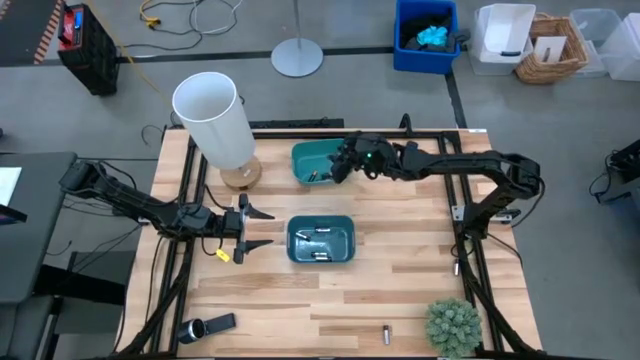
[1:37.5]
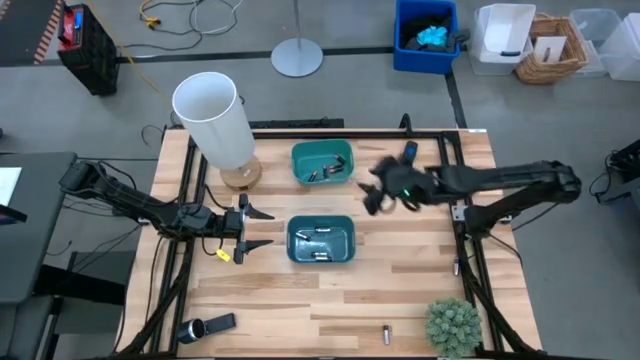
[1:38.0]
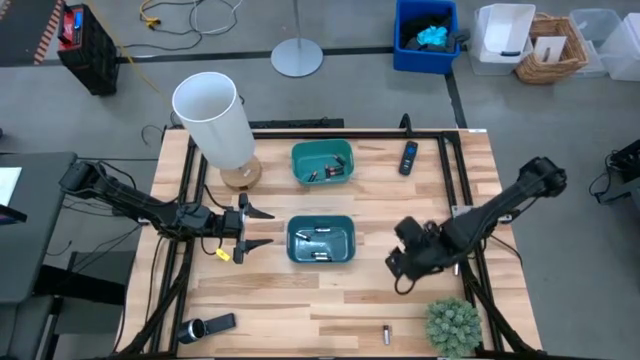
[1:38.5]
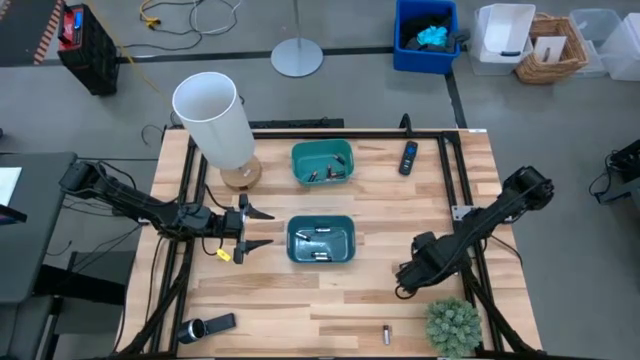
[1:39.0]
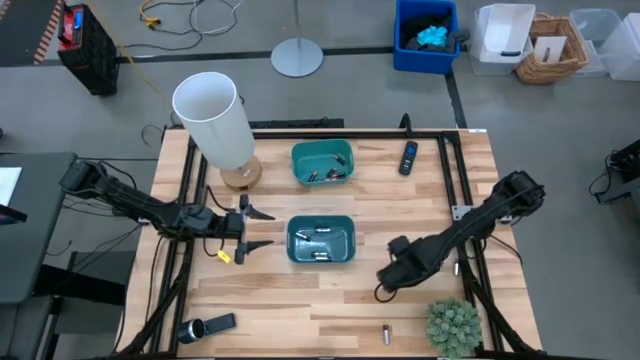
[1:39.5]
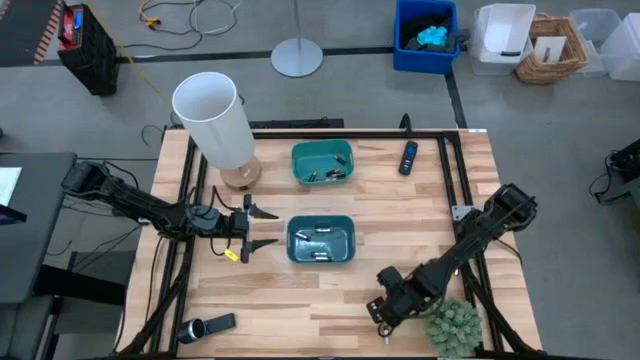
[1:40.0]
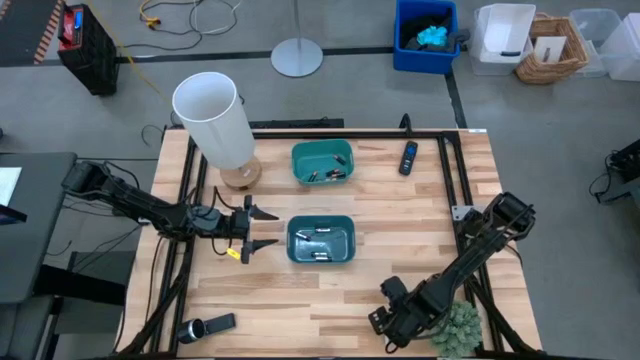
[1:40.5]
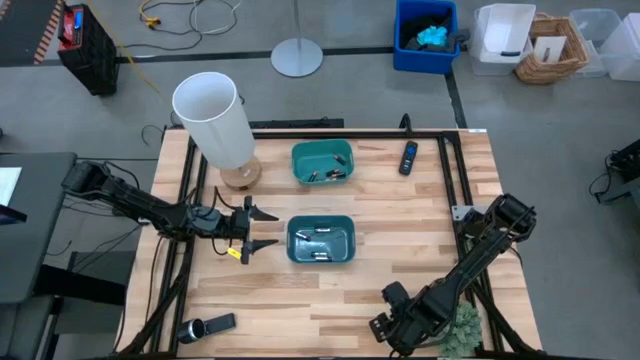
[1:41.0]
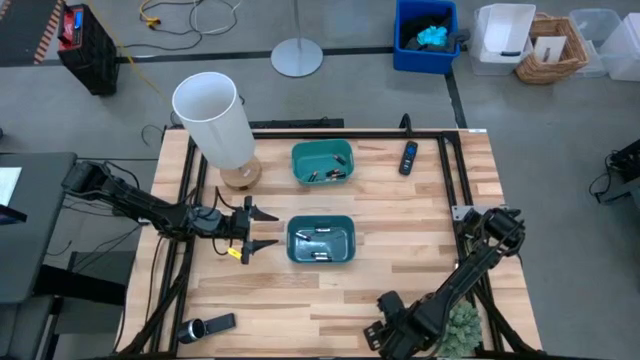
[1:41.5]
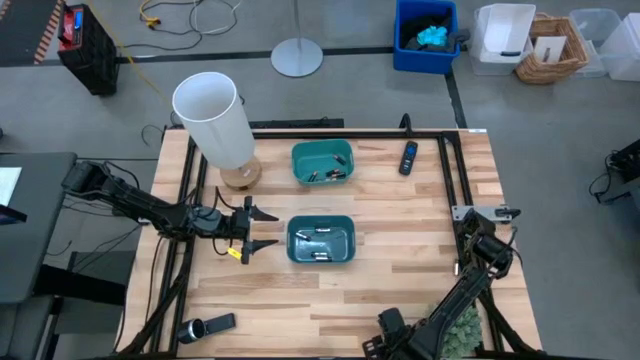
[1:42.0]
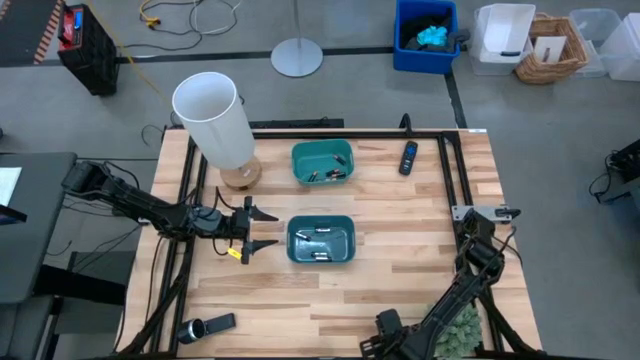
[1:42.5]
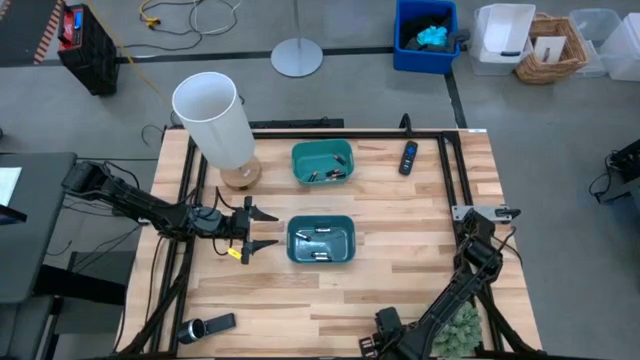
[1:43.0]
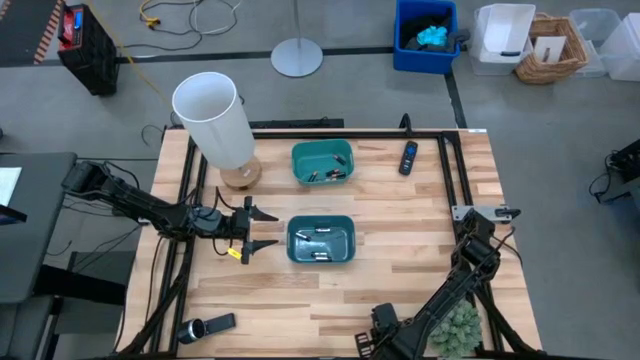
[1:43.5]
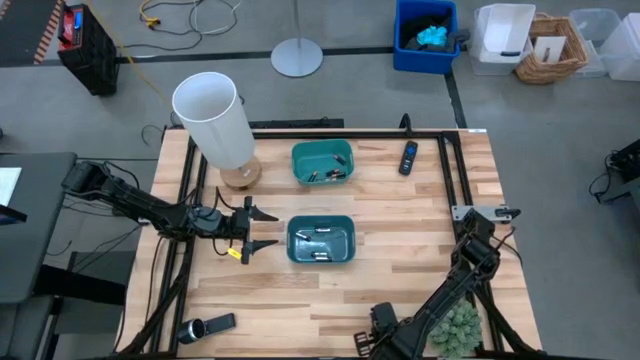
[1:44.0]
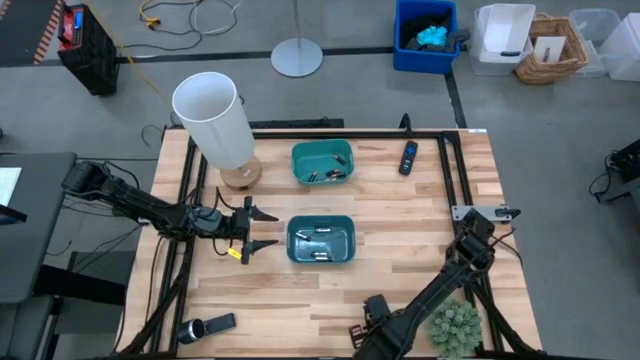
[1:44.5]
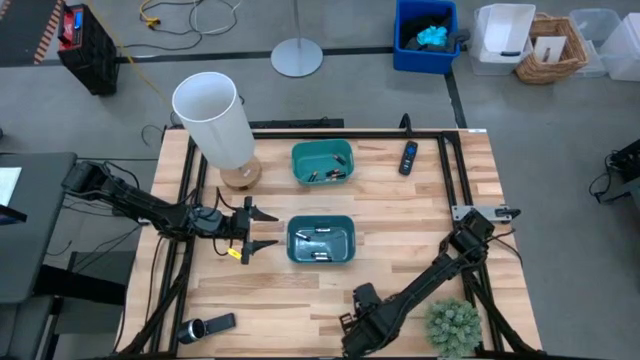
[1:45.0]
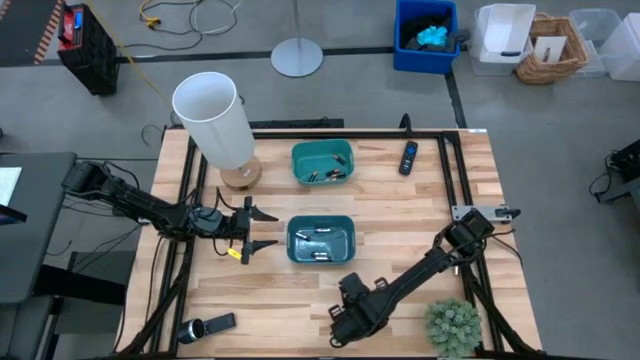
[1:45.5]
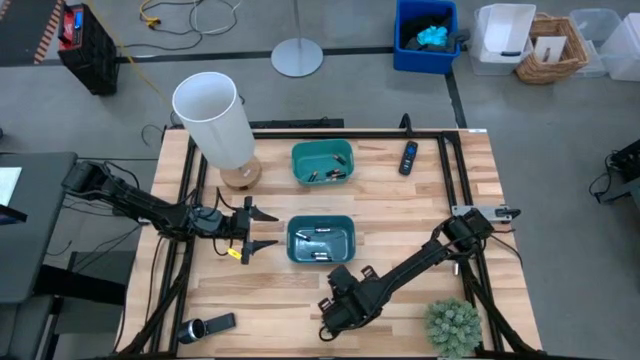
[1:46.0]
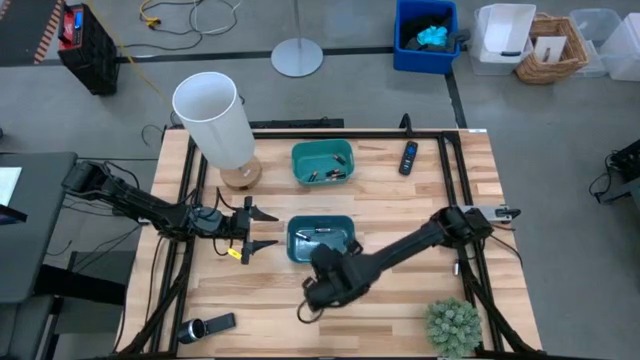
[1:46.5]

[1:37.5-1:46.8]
Task: Sort batteries
Put the silver battery into the blue bin

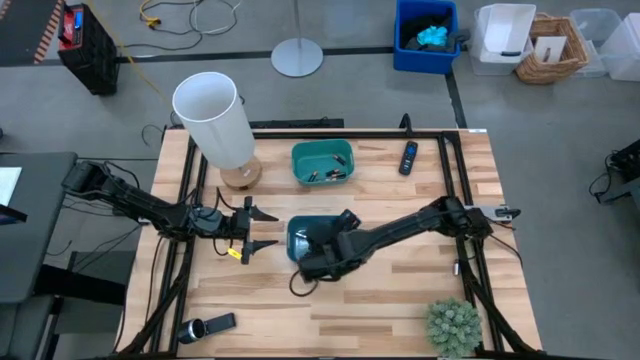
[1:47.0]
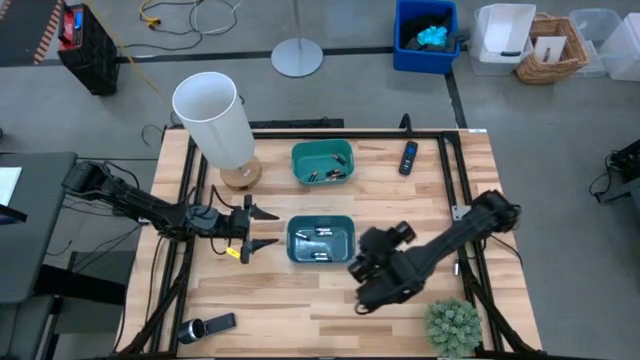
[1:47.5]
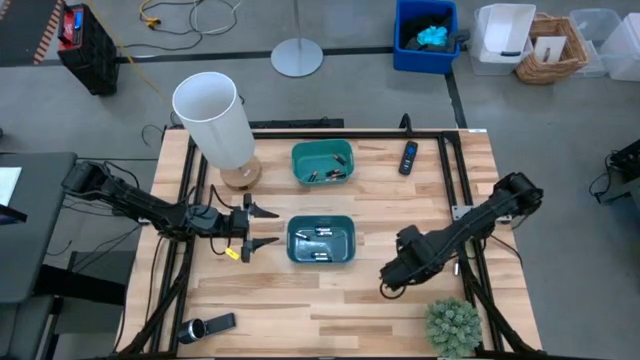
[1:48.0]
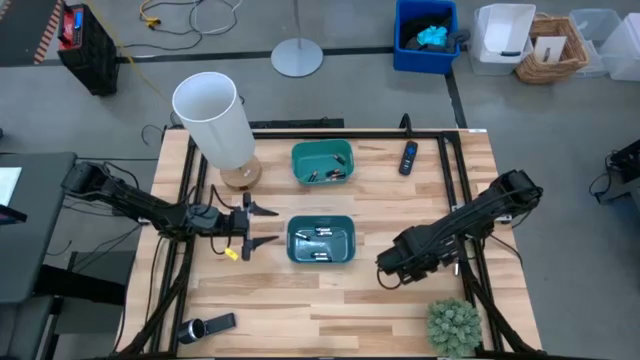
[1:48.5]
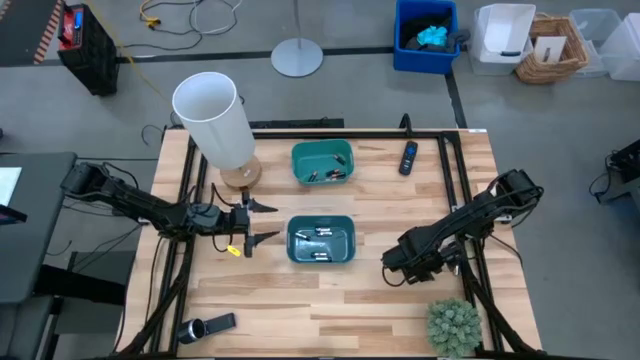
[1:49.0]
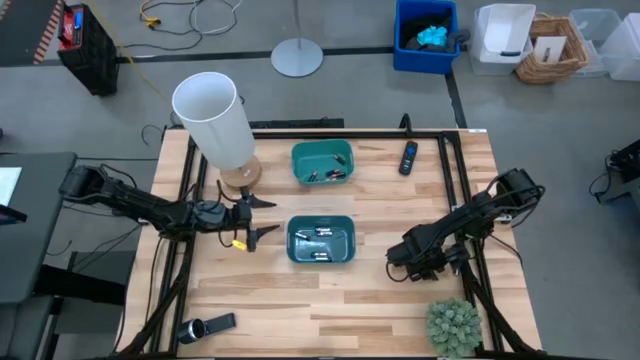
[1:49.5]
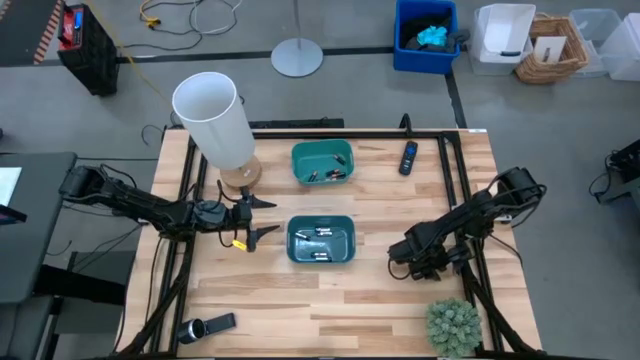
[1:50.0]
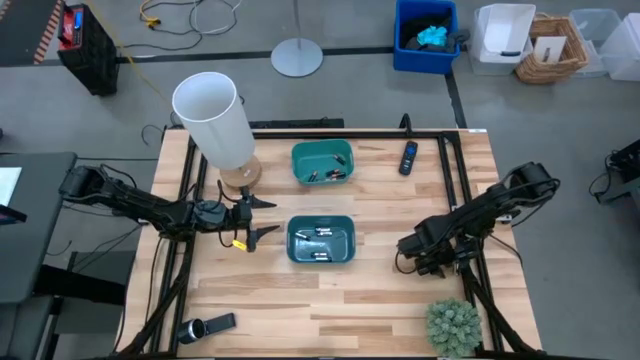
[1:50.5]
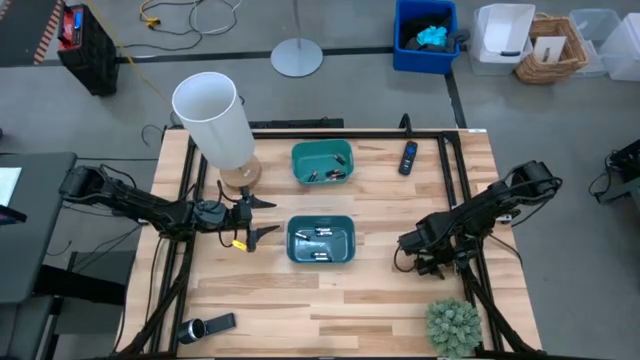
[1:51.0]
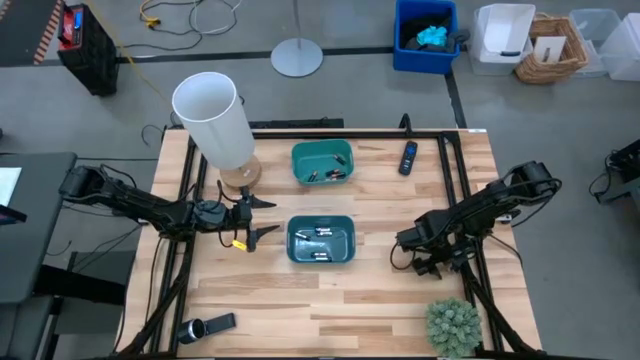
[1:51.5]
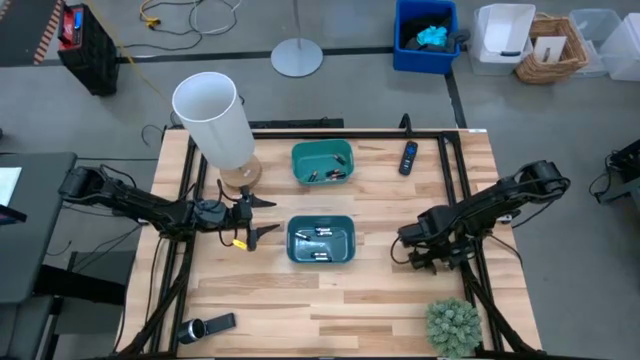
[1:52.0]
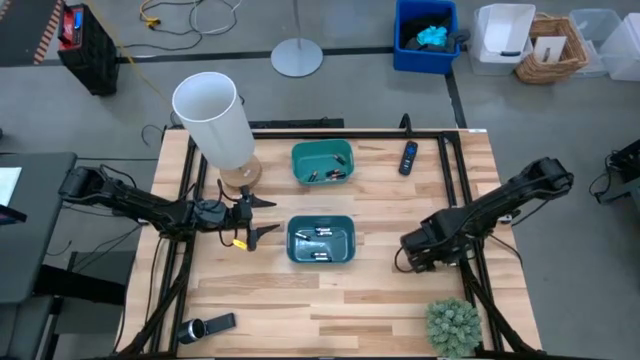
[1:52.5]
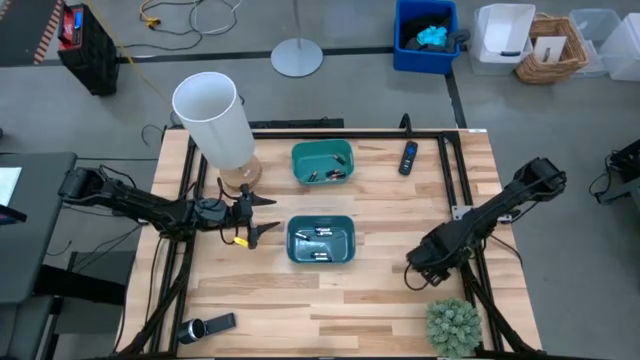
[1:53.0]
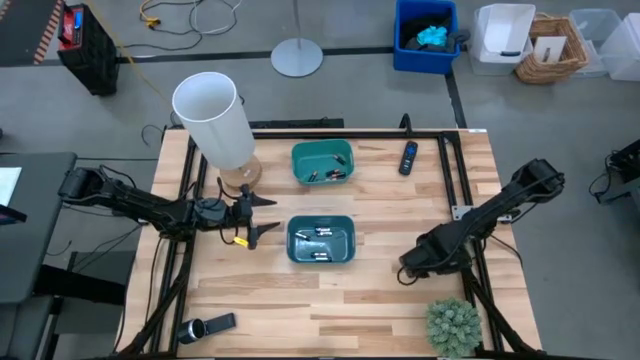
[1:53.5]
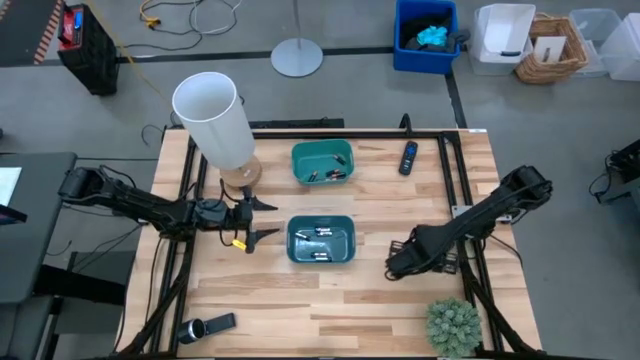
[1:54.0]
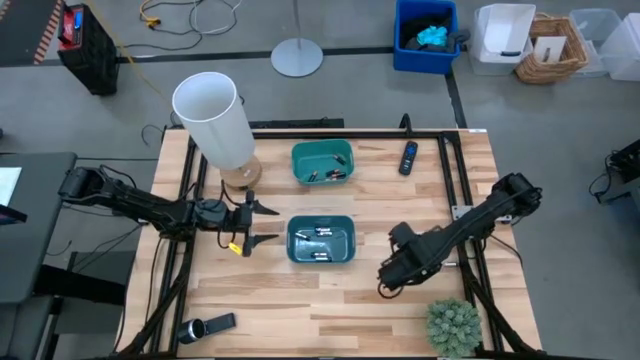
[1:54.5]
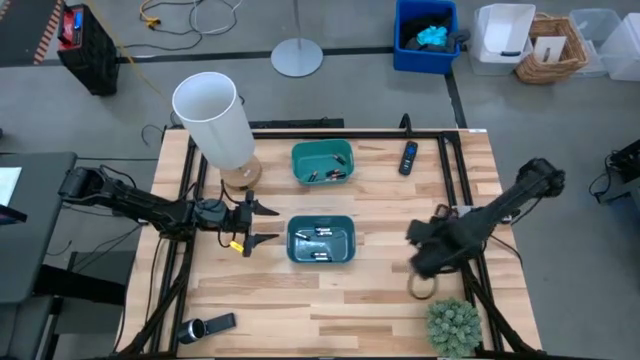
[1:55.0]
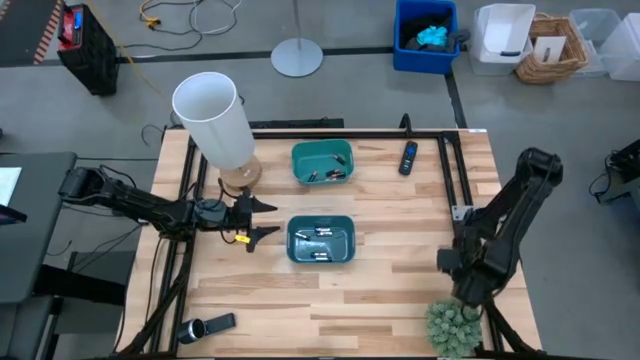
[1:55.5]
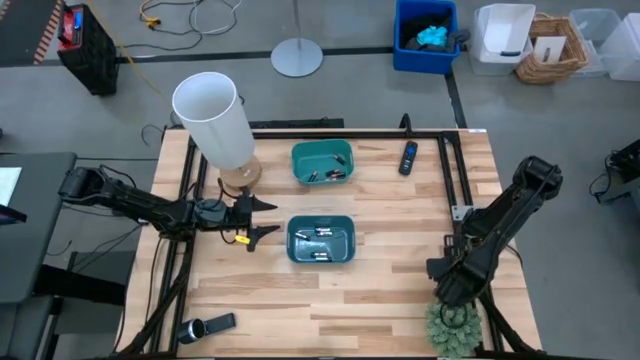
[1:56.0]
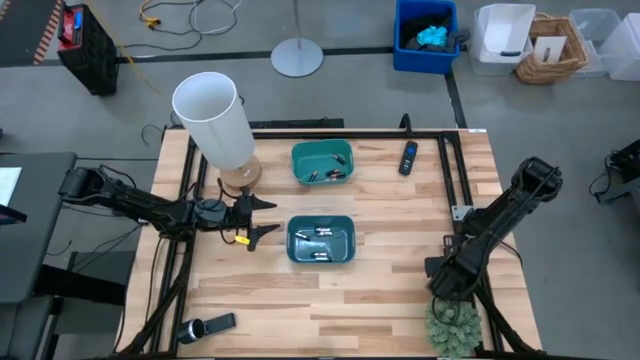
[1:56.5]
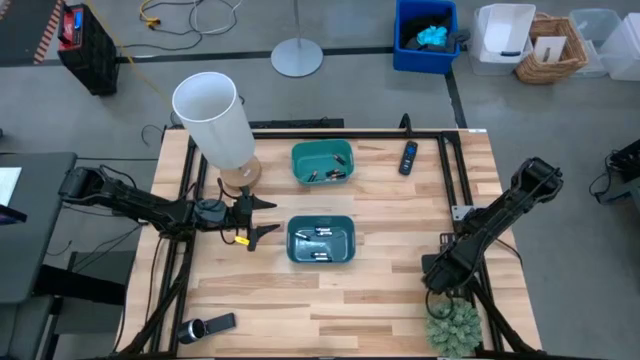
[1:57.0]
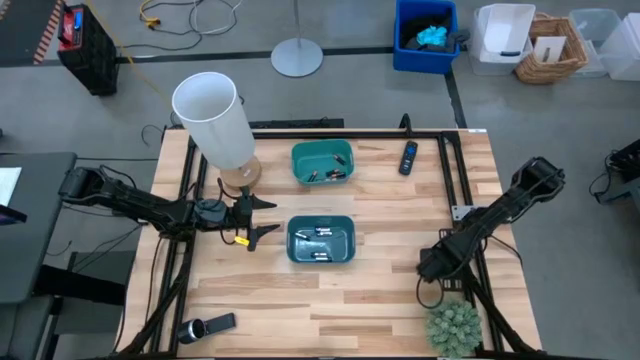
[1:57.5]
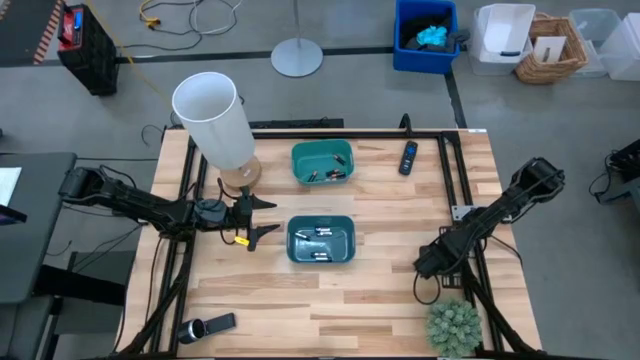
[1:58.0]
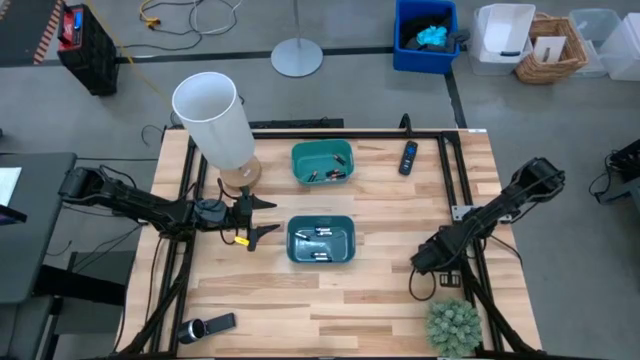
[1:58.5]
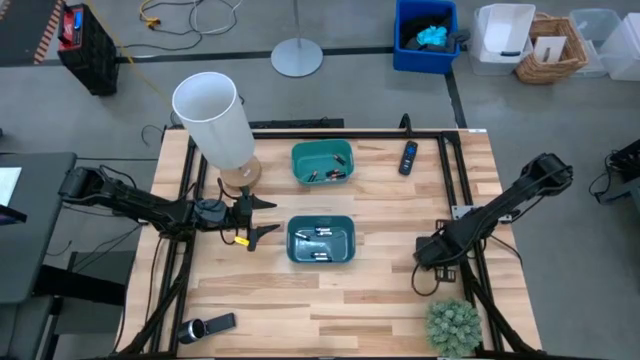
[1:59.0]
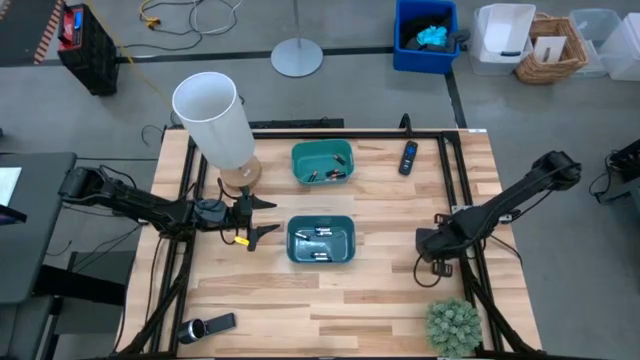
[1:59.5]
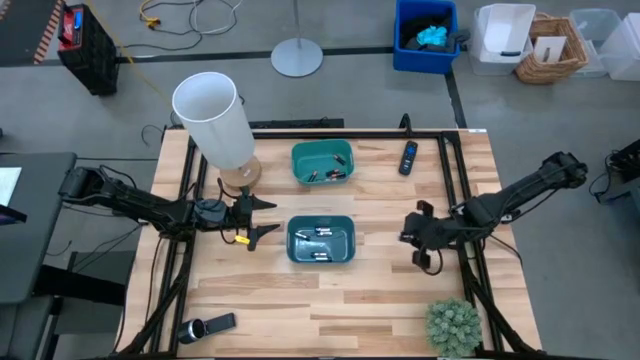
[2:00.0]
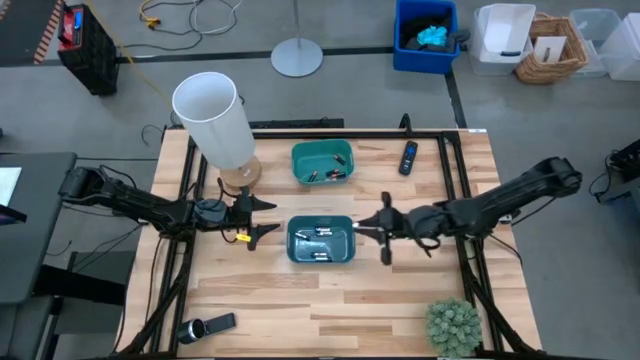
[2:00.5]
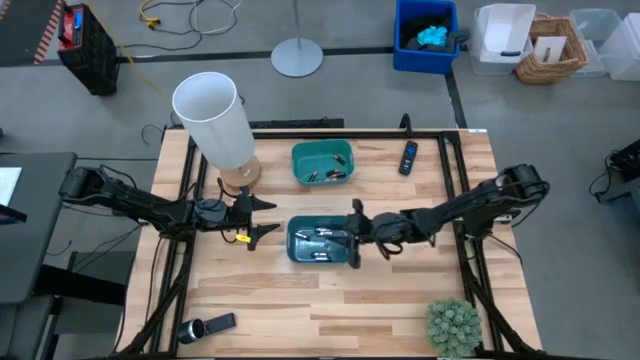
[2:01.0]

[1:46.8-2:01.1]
Put the silver battery into the blue bin
